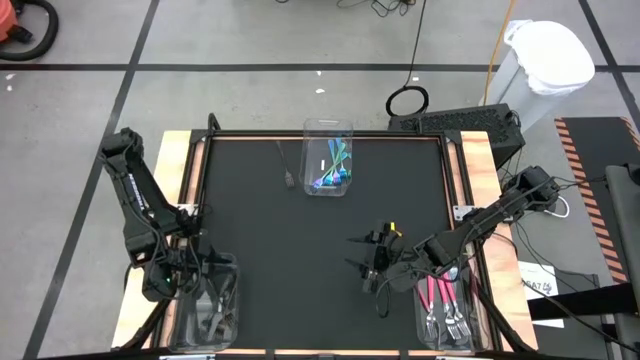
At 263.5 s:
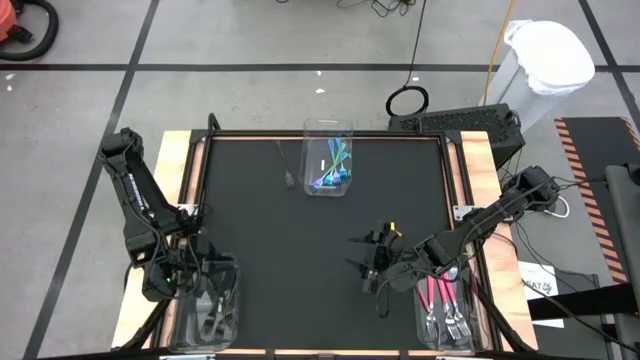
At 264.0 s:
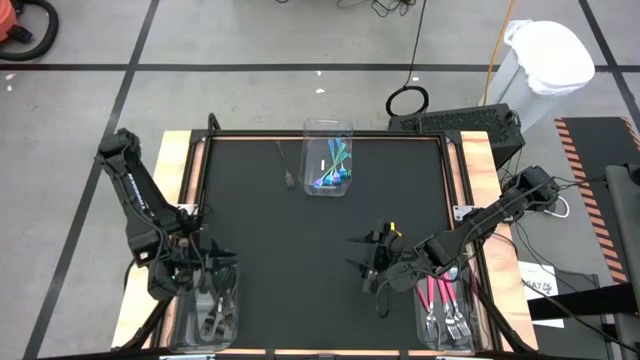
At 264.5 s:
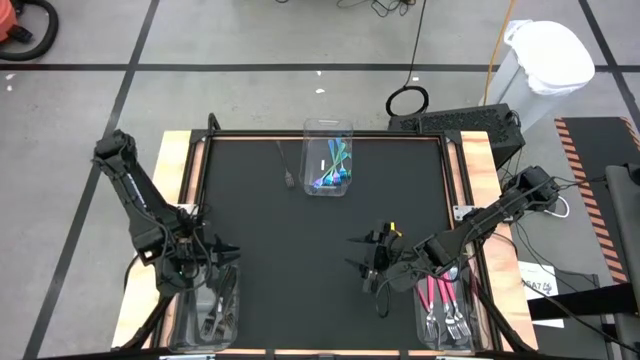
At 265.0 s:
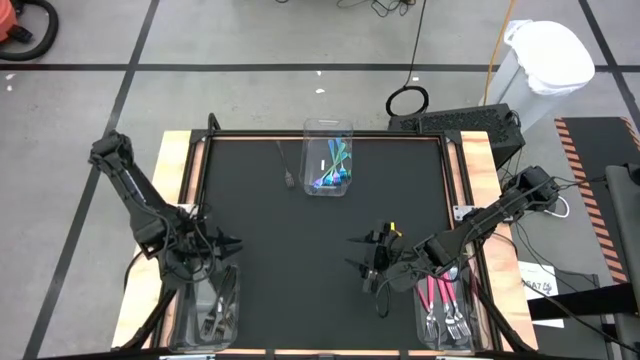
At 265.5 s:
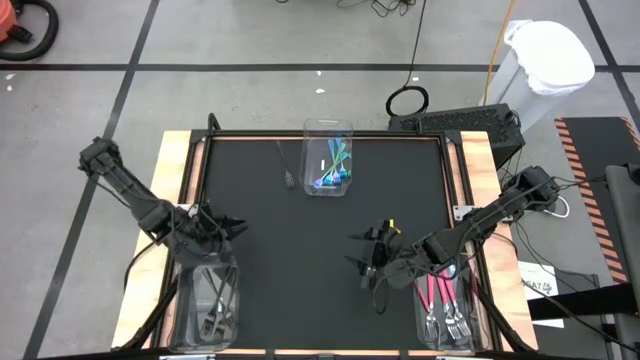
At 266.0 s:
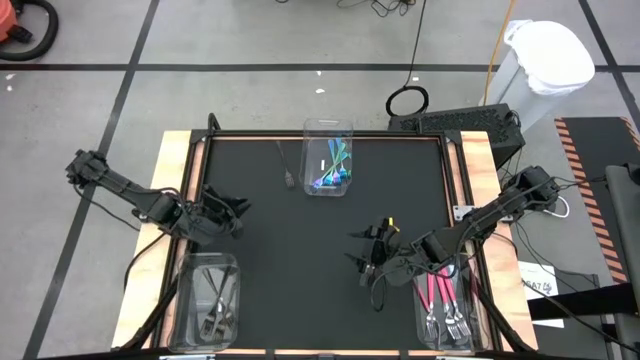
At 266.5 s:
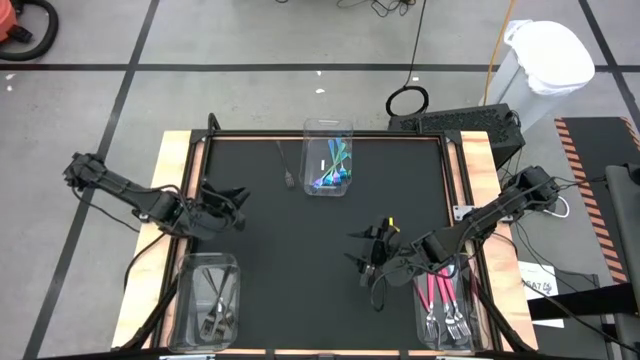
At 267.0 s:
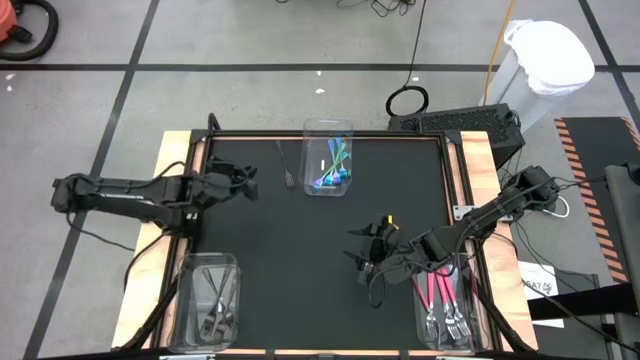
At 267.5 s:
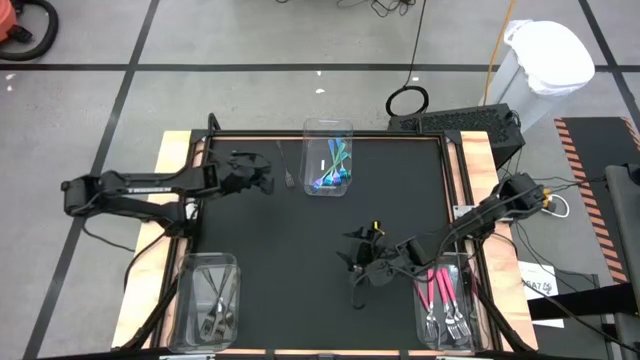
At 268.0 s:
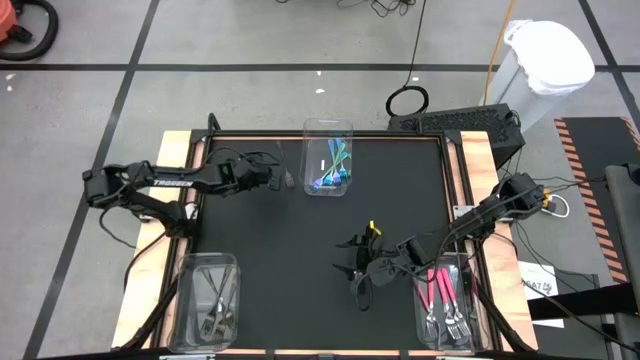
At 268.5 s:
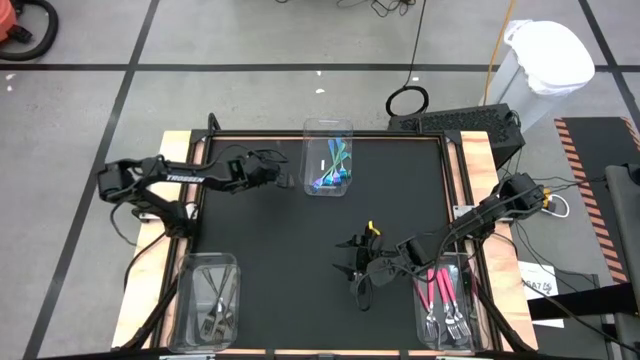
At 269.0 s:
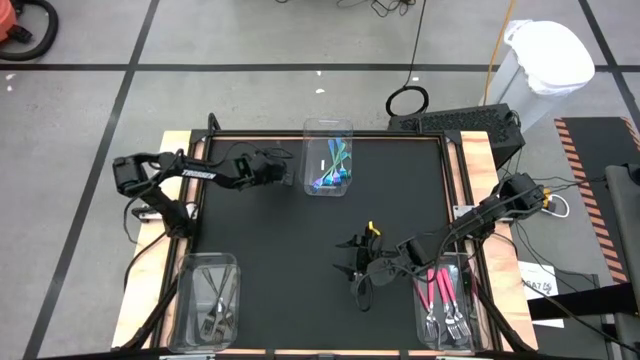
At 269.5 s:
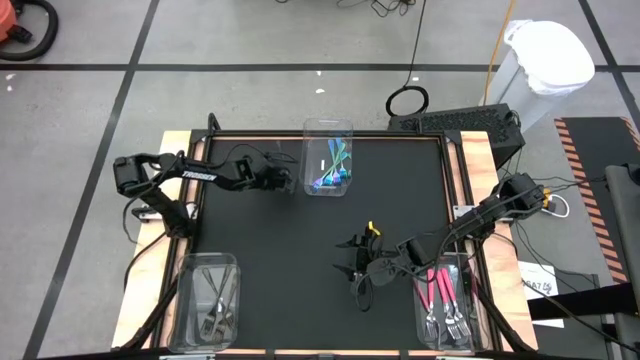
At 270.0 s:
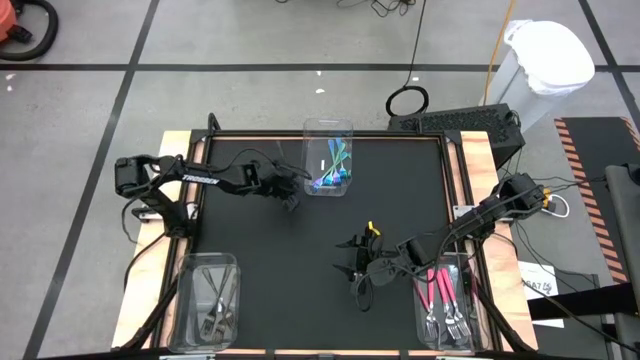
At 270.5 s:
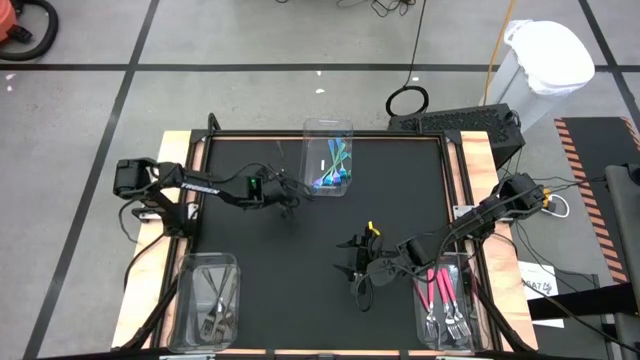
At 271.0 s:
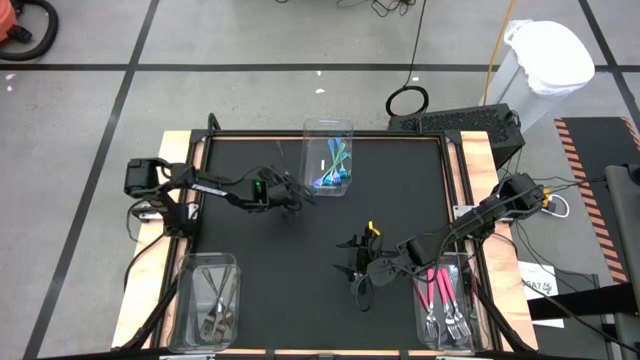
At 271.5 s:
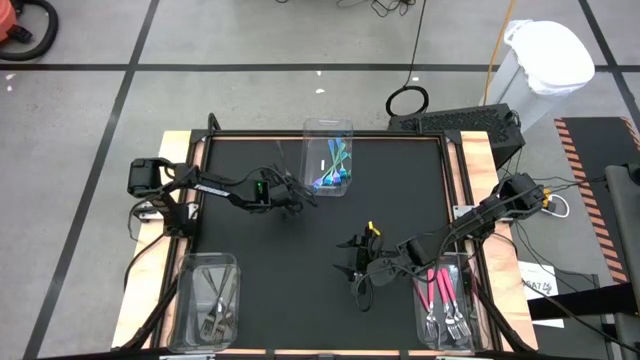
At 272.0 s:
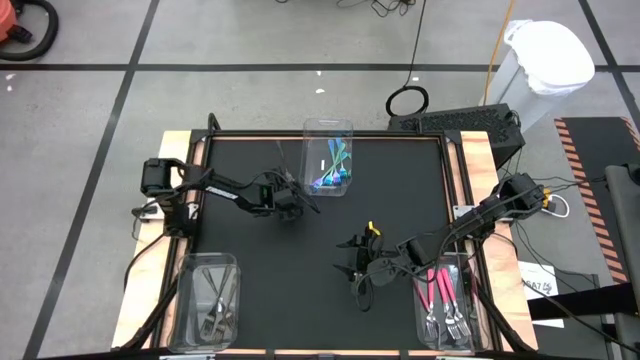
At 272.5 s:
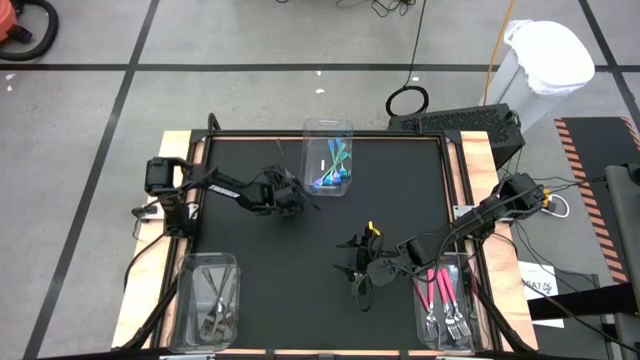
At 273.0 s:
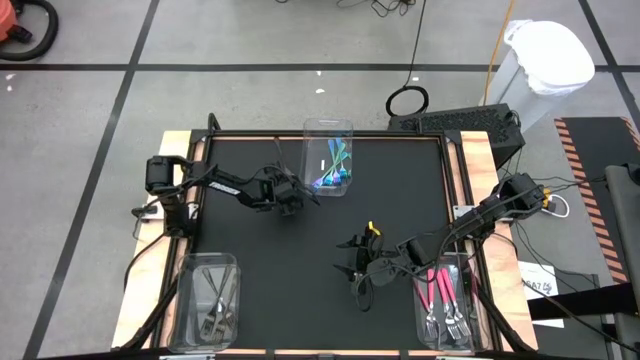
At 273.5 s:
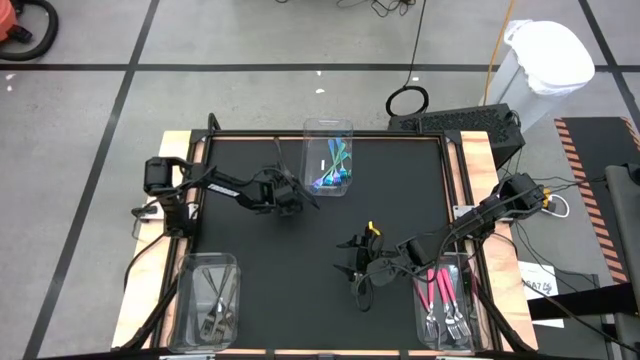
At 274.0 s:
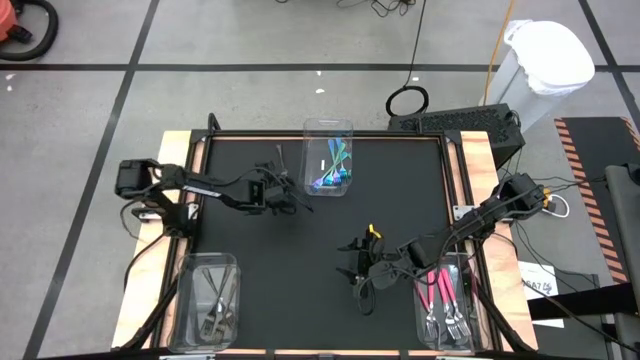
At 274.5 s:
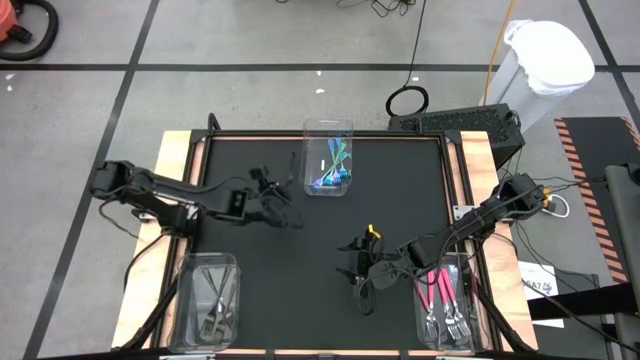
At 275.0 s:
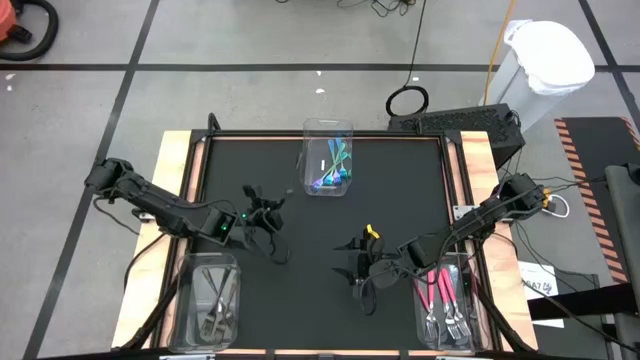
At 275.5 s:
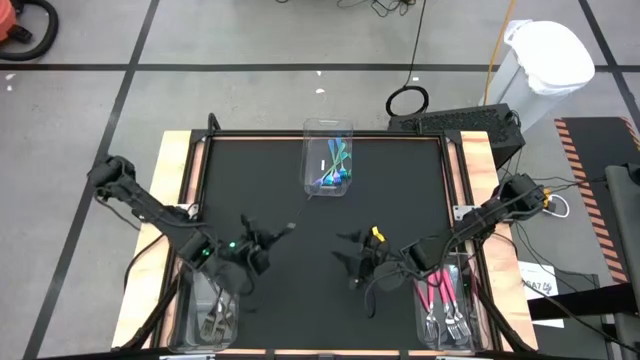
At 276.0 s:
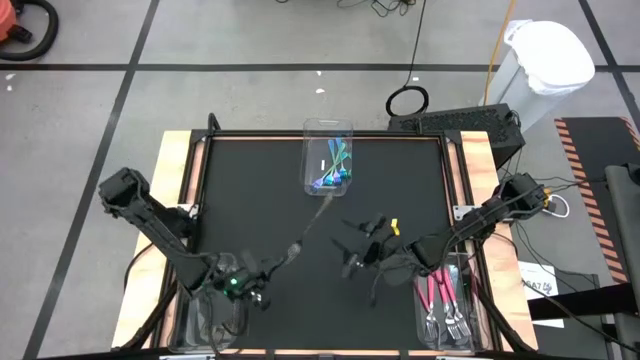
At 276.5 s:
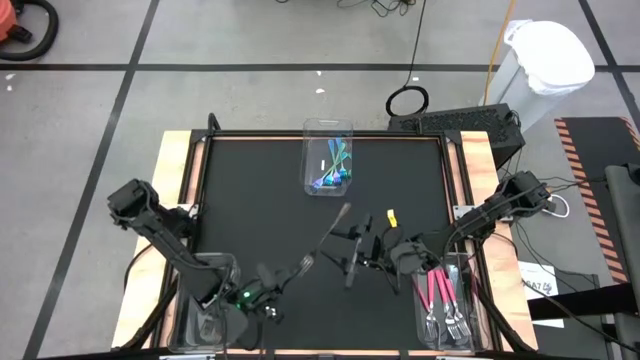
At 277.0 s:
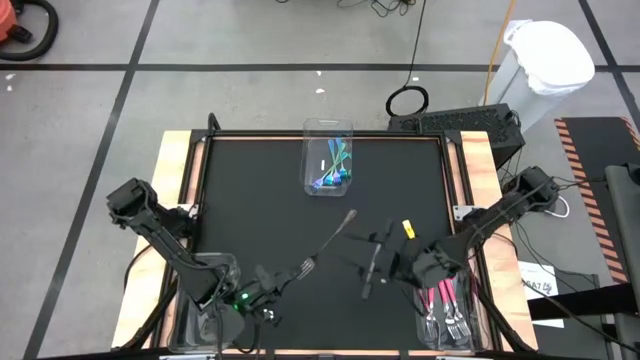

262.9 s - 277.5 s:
Task: Sort silverware by color (type)
Put the black fork into the bottom left transparent bin

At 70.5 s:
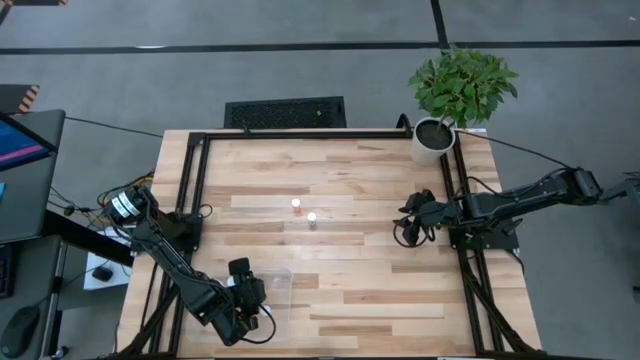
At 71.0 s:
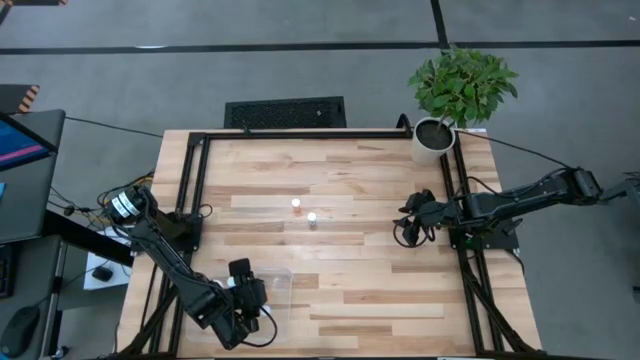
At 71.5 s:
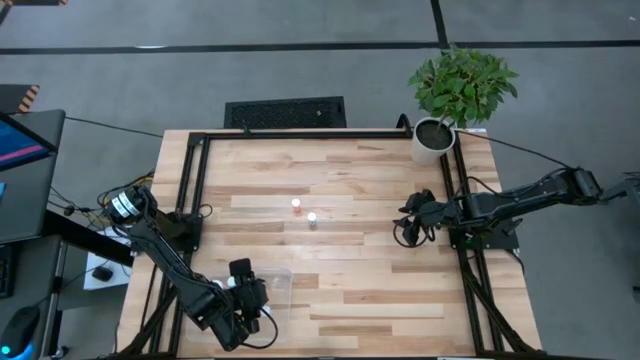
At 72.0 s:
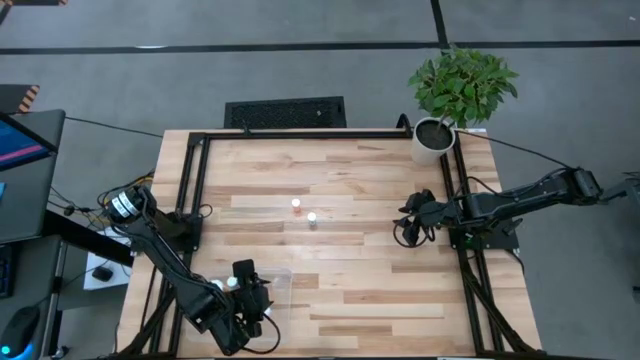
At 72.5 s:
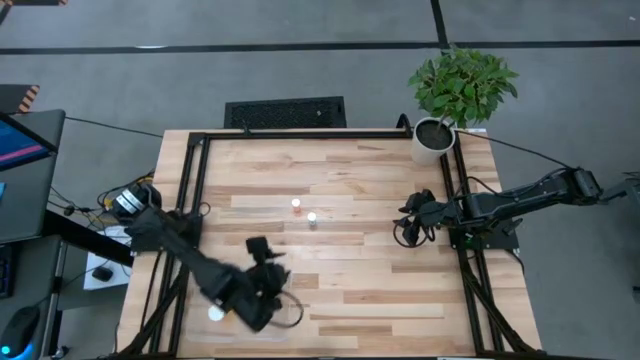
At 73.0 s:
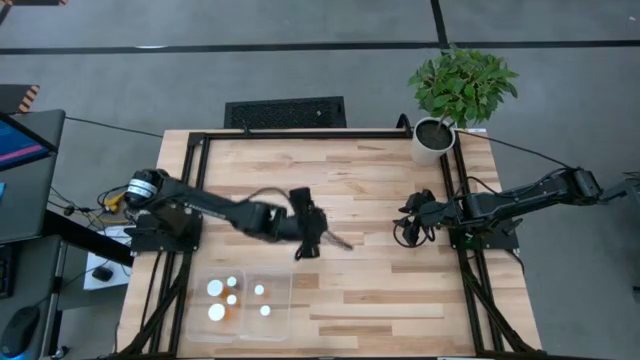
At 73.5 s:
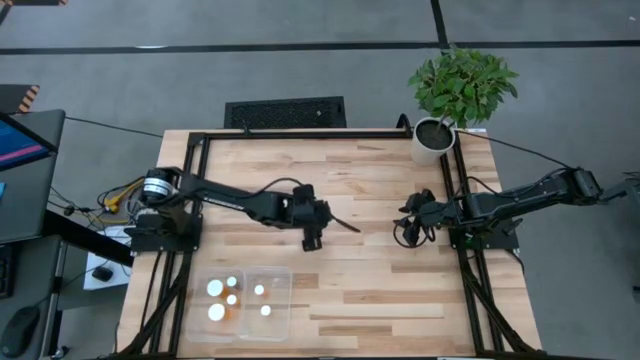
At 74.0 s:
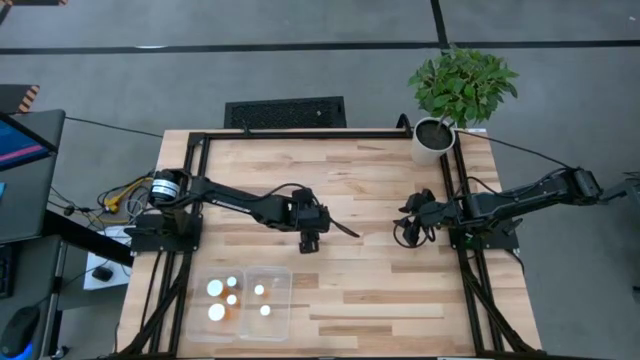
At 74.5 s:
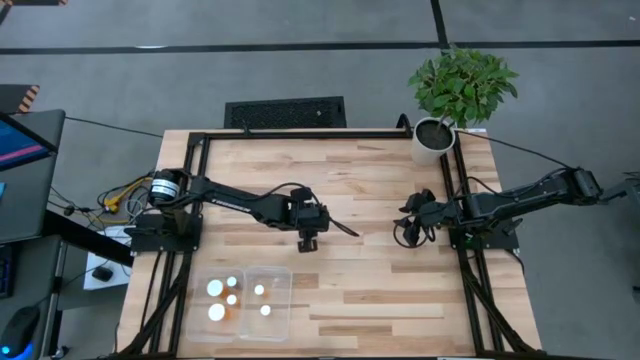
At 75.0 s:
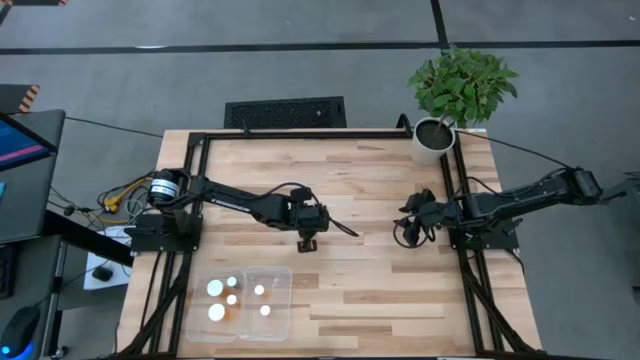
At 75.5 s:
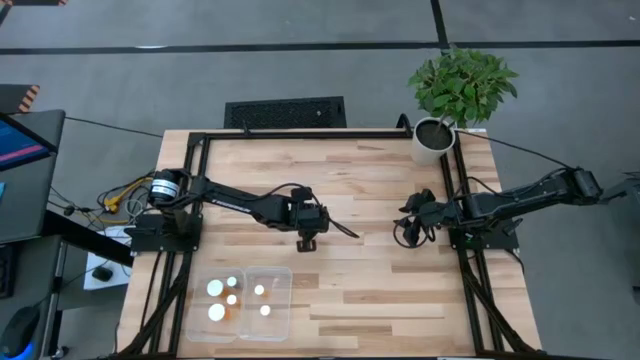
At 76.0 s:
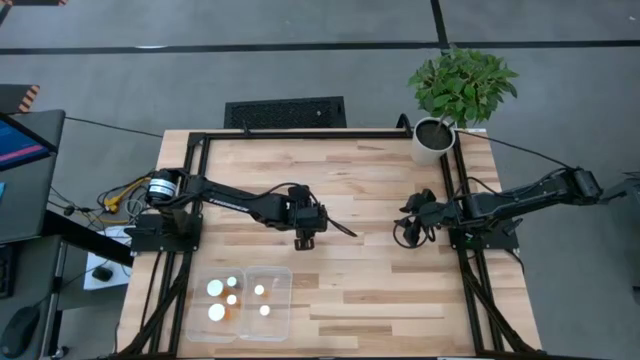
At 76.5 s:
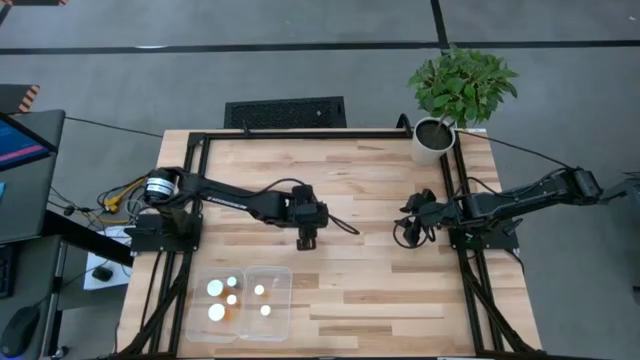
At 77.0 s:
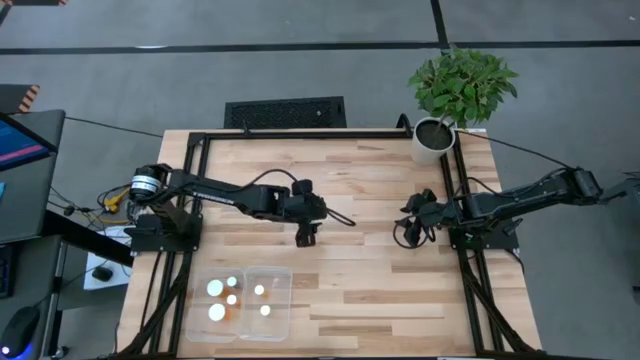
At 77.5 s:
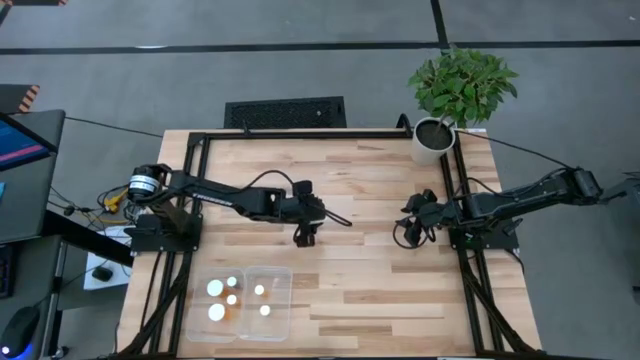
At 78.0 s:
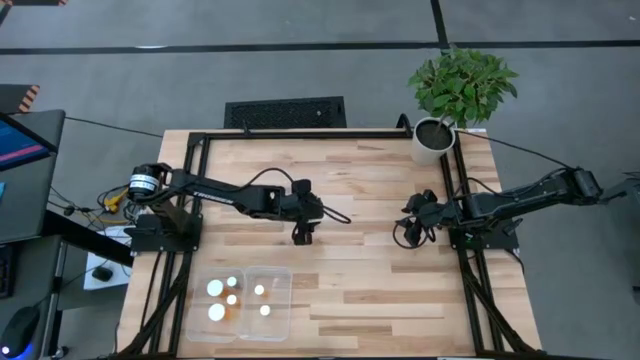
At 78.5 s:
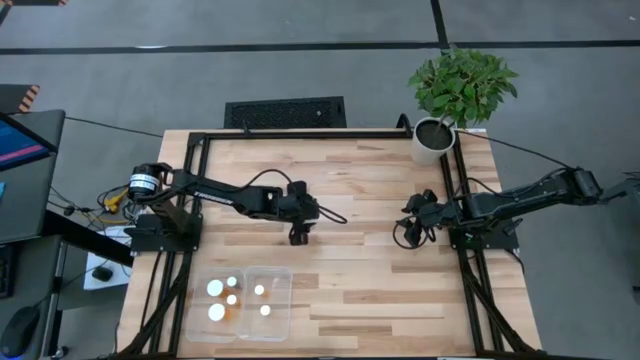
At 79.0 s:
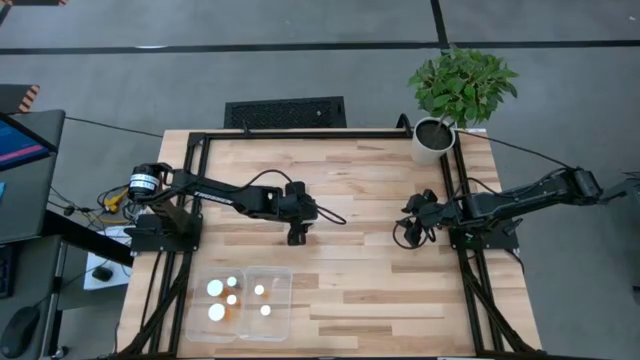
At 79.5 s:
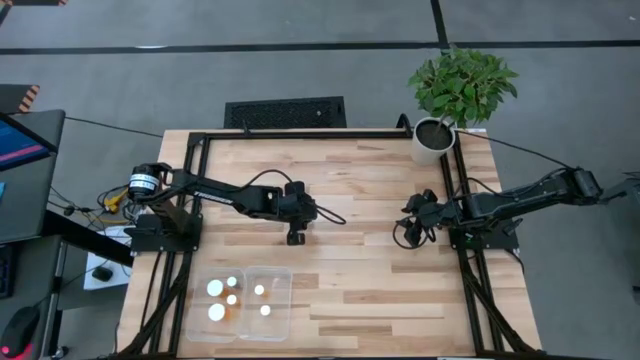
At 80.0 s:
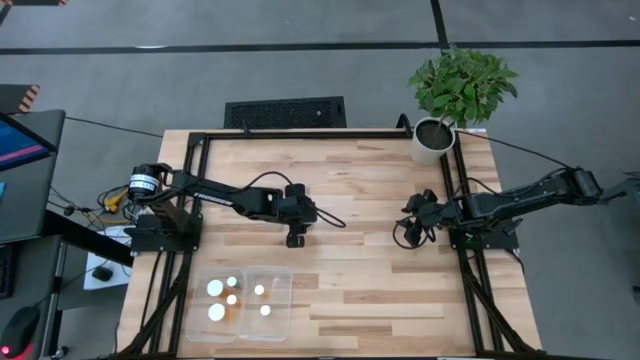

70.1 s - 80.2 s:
Task: Pick and place medicine bottles into bin by pill shape (circle, oval)
Put the blue pill bottle into the right transparent bin
